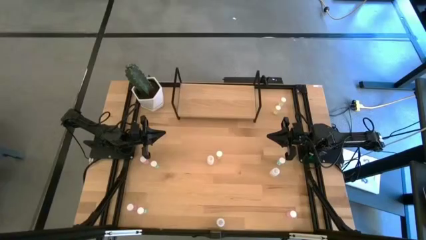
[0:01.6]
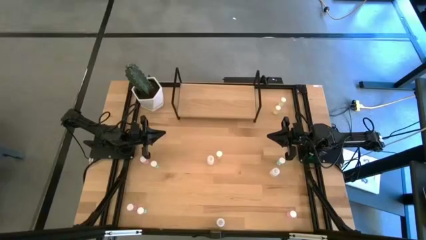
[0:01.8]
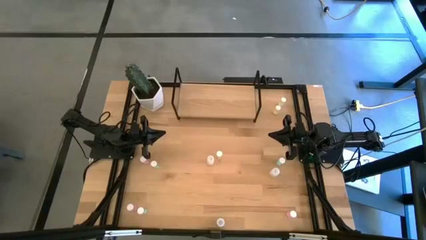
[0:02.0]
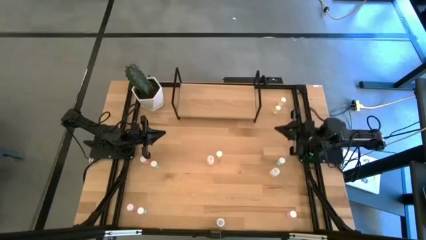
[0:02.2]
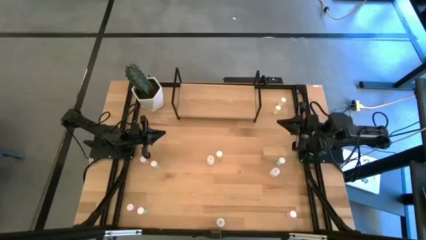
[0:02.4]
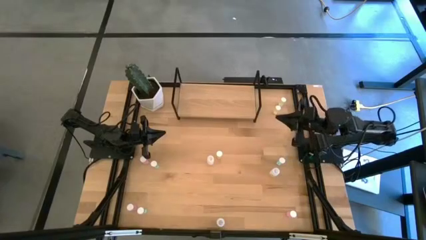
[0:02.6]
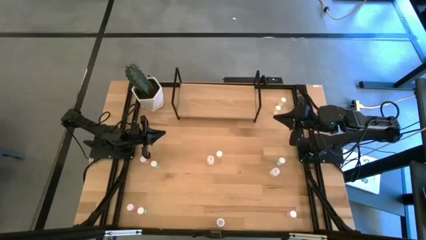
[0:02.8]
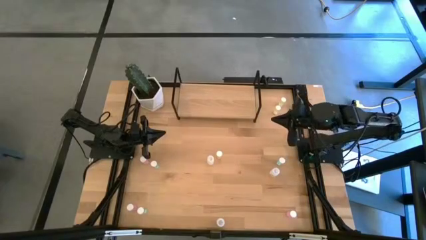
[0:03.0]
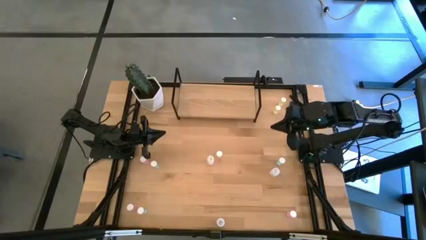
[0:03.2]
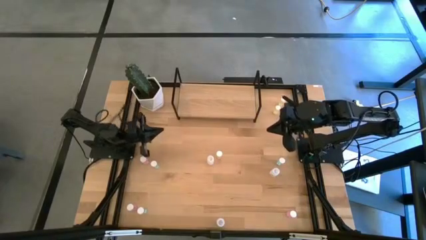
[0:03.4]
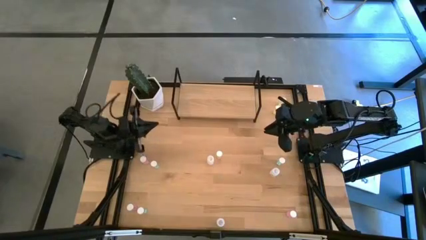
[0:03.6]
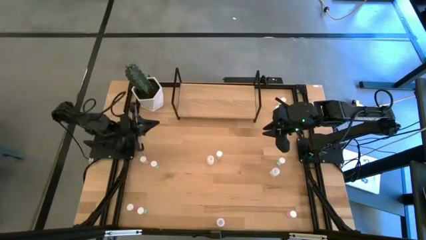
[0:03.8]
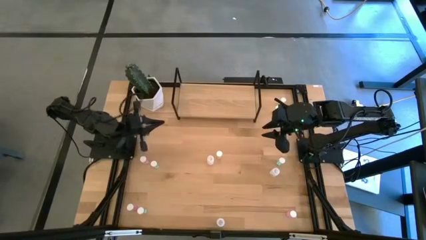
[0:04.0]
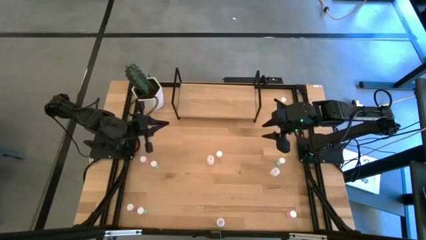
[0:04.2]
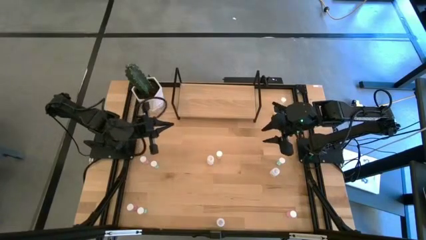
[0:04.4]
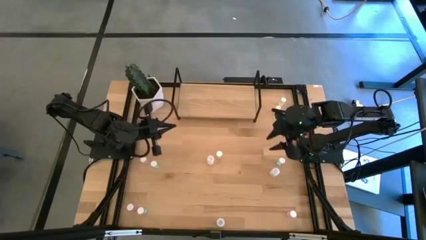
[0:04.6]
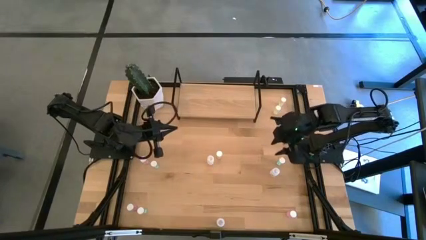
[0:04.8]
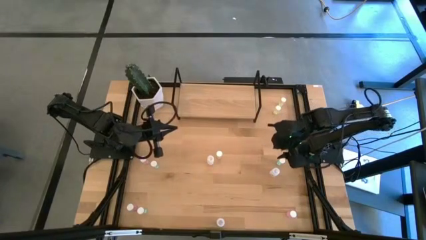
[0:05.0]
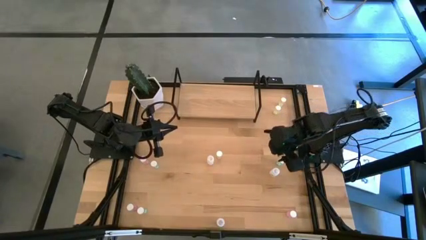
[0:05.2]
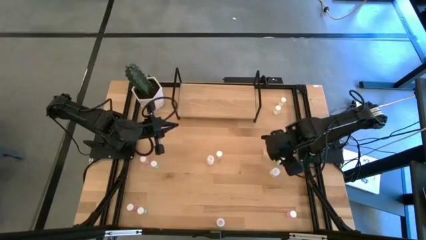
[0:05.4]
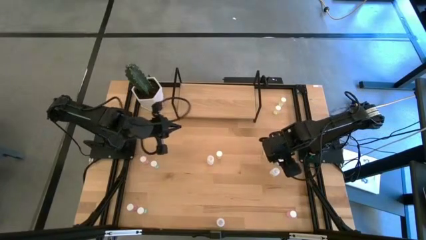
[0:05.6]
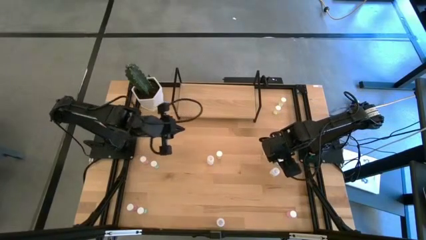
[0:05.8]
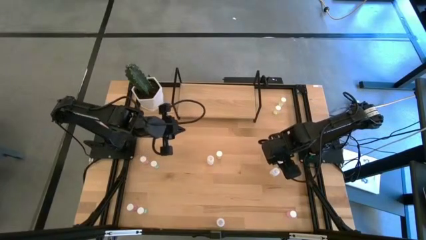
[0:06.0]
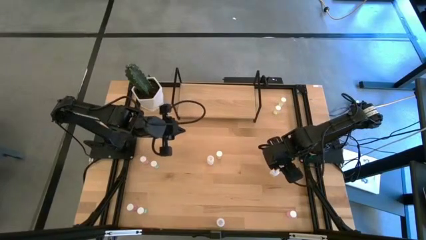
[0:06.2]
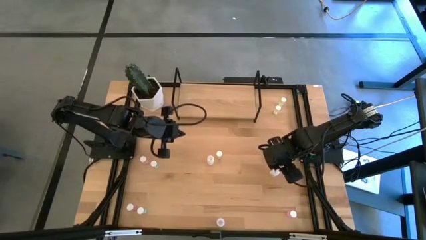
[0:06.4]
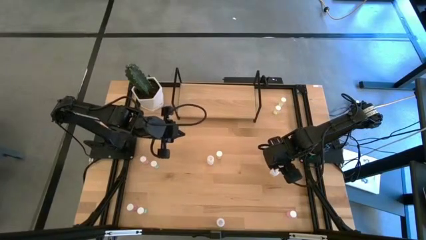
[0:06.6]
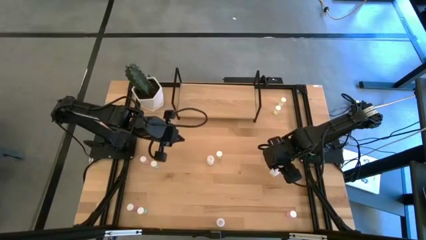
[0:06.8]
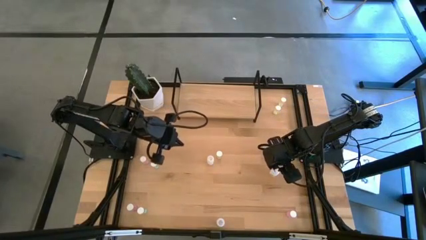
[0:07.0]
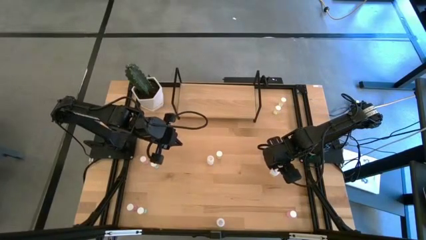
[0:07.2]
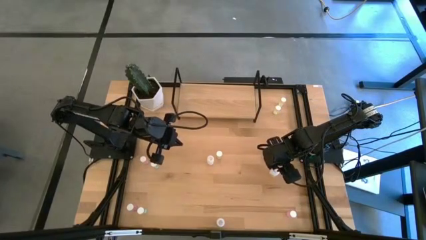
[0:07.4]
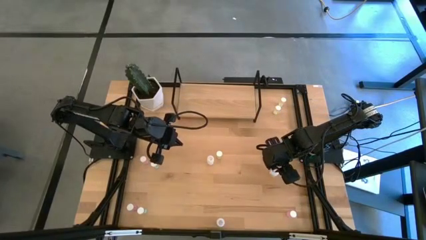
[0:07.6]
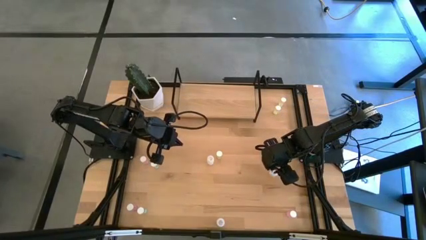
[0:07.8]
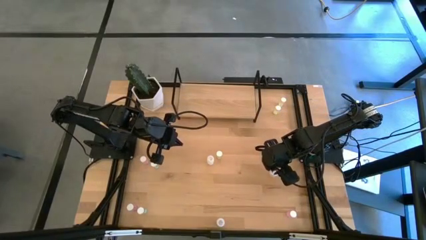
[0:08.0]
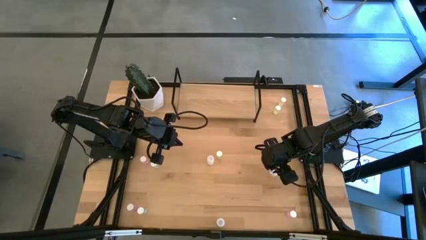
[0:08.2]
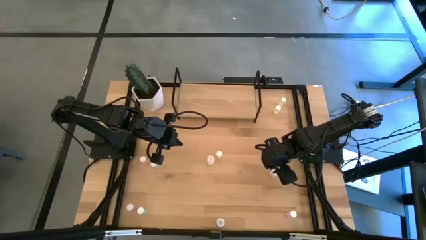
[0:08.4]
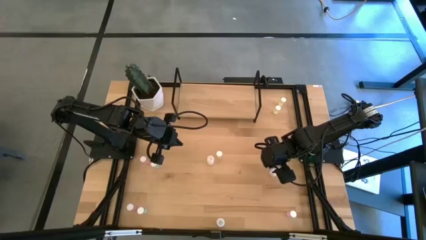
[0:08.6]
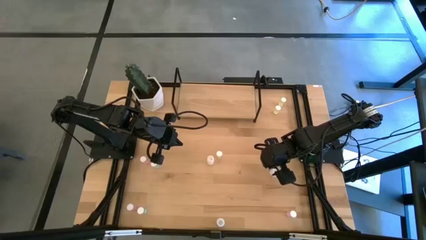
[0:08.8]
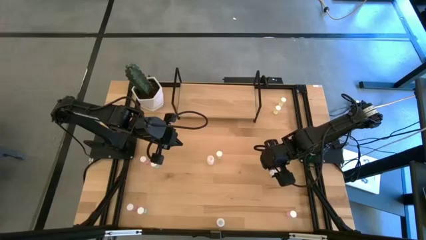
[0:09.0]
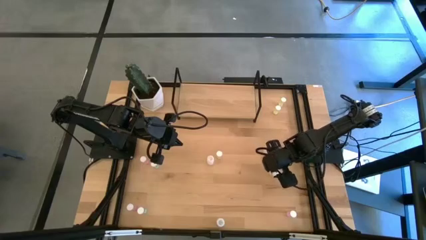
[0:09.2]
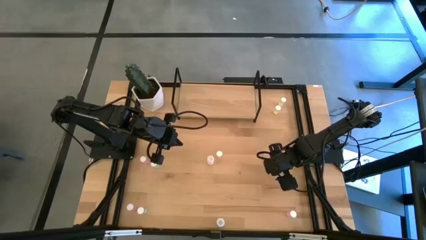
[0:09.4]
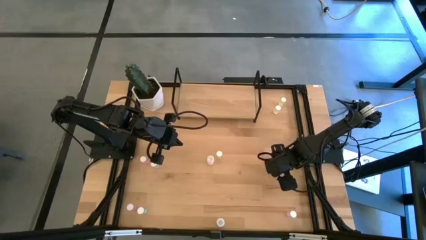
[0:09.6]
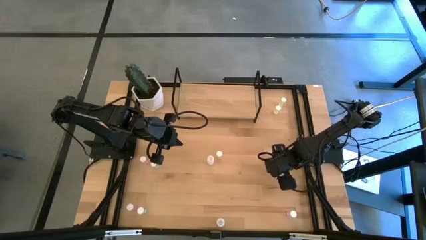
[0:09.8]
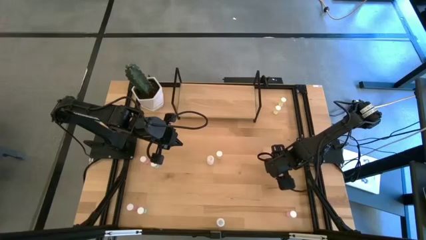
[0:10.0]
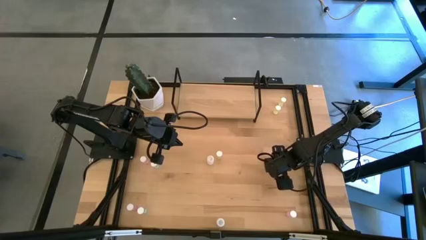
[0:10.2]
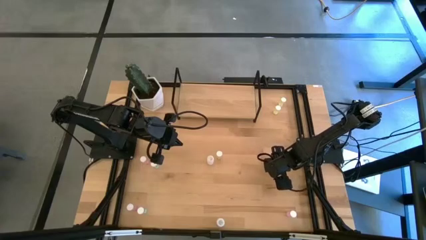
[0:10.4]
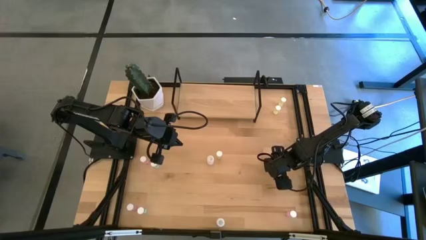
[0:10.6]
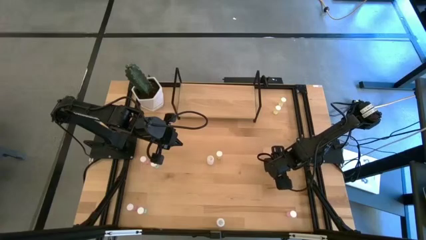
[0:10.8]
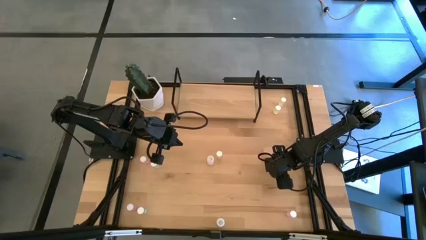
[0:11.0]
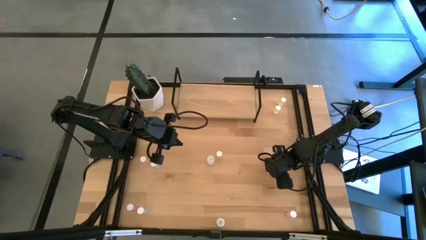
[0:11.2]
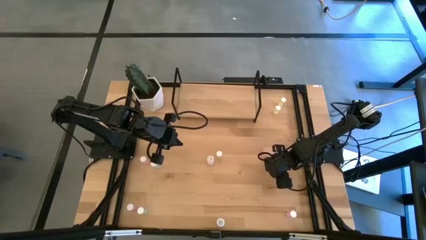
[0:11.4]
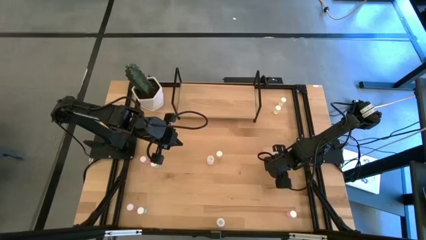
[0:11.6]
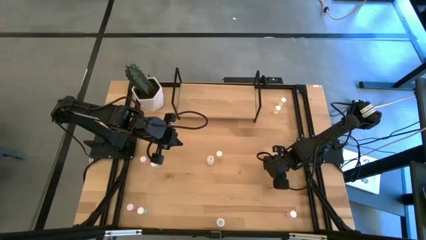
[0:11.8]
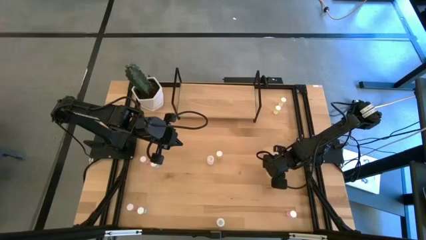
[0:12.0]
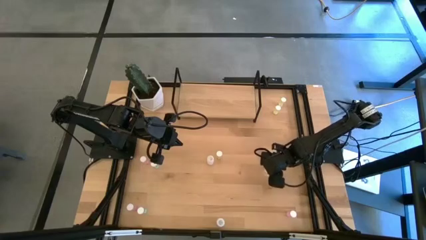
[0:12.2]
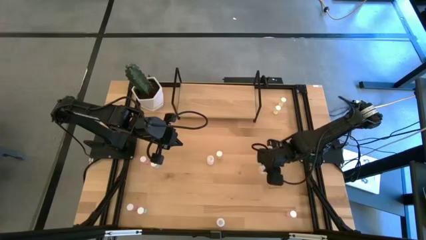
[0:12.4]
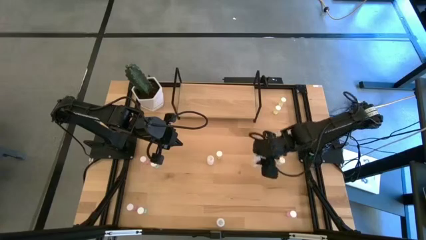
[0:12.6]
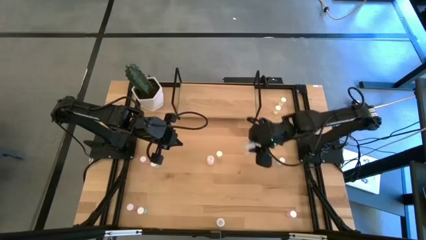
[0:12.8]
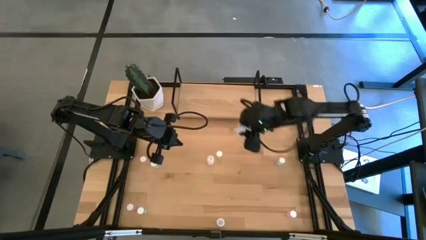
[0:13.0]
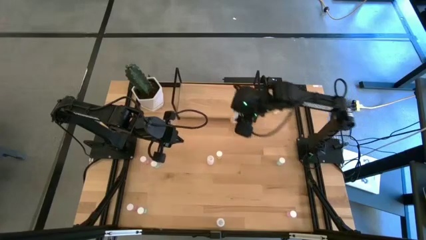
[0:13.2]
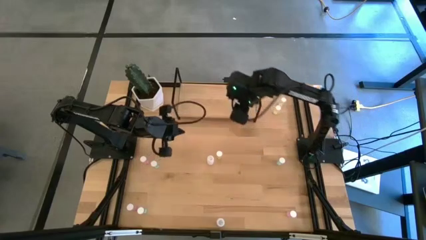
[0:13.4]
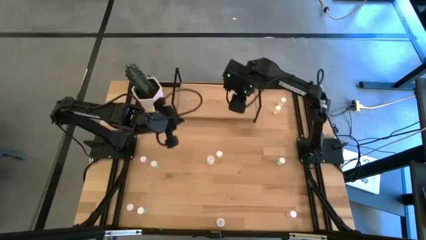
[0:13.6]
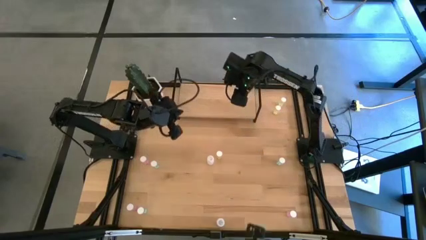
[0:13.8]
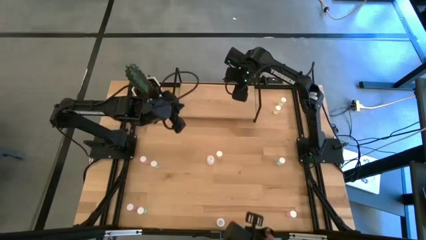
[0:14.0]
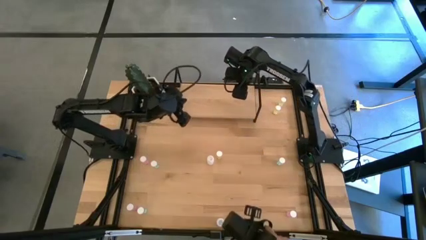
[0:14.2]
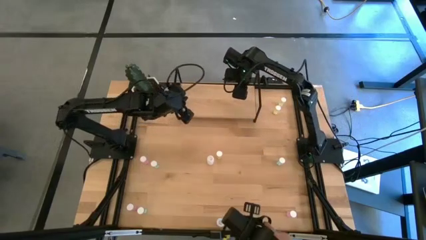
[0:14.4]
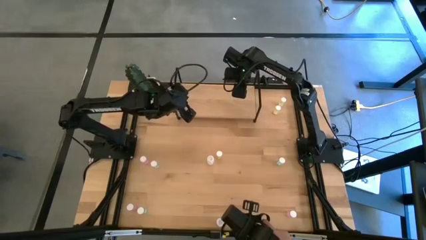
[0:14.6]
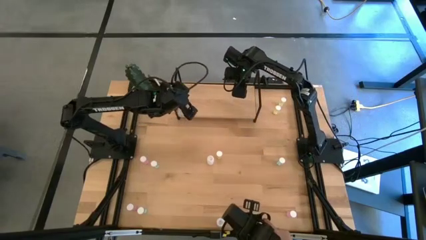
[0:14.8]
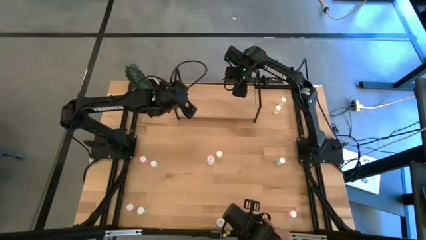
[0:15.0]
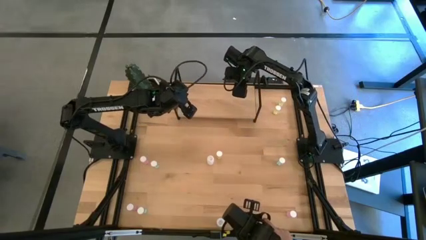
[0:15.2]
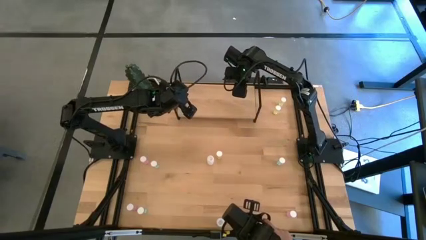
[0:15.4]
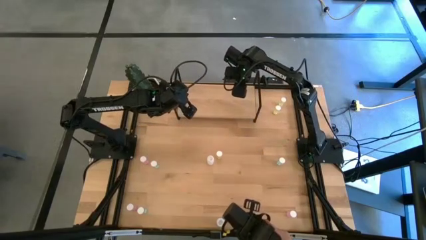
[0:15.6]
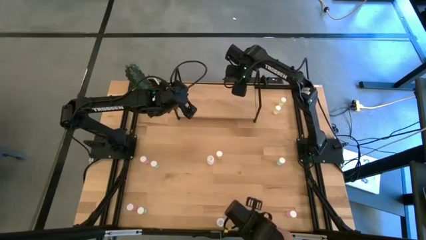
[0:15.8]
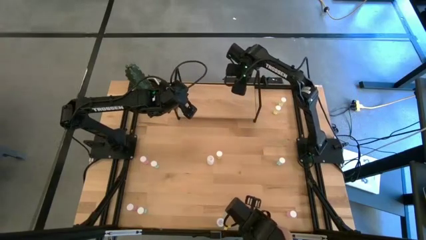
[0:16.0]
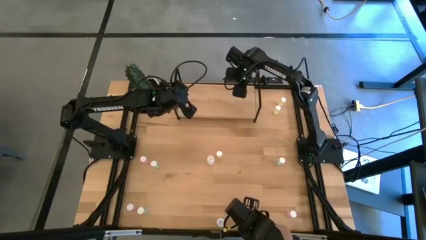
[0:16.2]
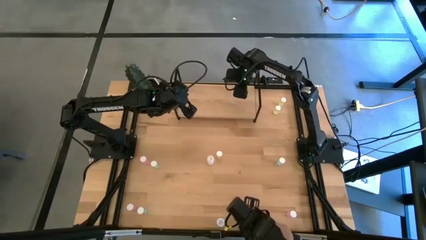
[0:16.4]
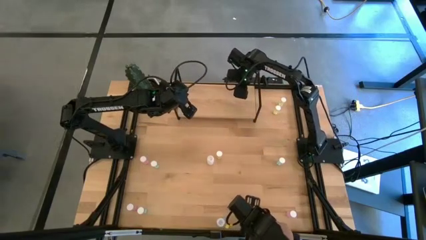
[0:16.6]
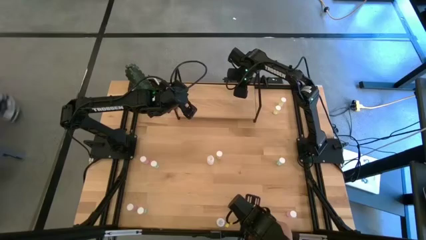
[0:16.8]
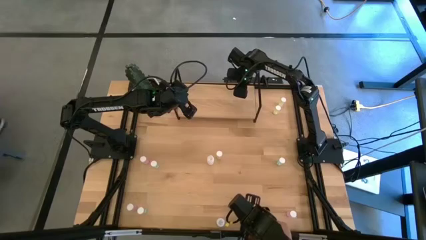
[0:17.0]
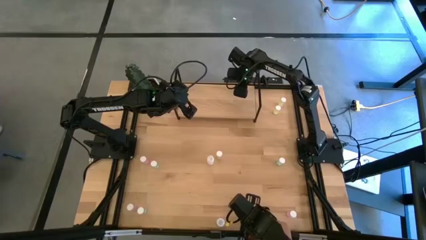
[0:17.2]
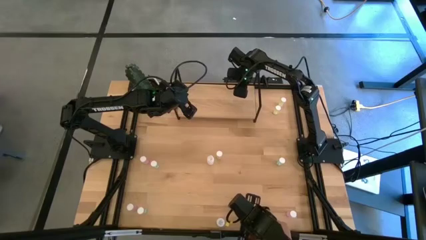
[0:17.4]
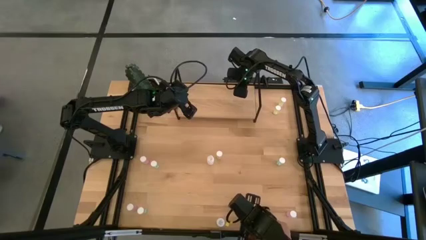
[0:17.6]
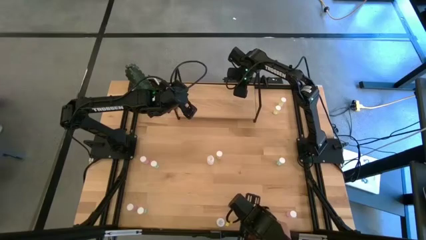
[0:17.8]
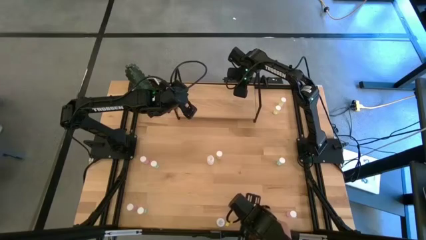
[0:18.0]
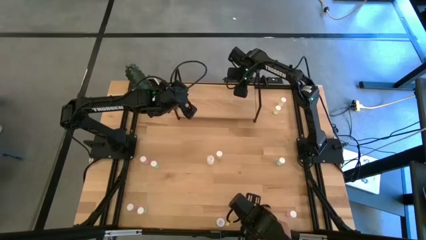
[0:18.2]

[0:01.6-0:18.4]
Task: Pick and place medicine bottles onto shelf by color
Put the right white pill bottle on the shelf
